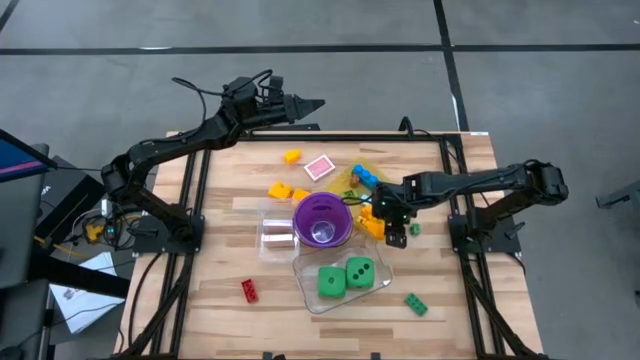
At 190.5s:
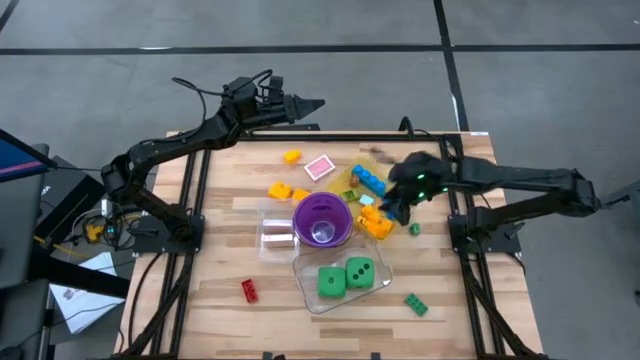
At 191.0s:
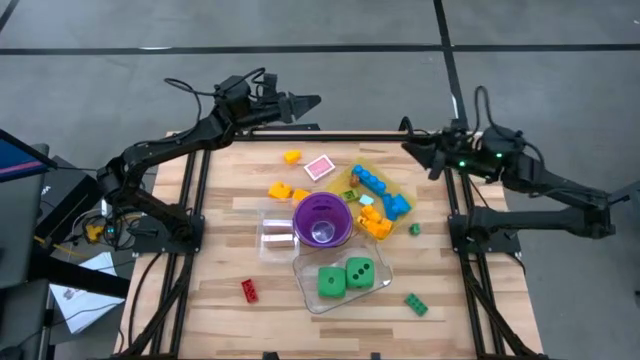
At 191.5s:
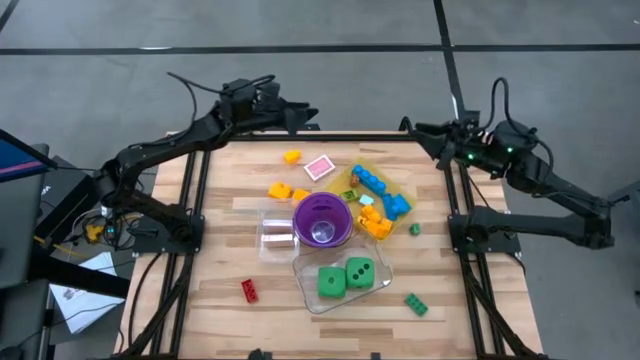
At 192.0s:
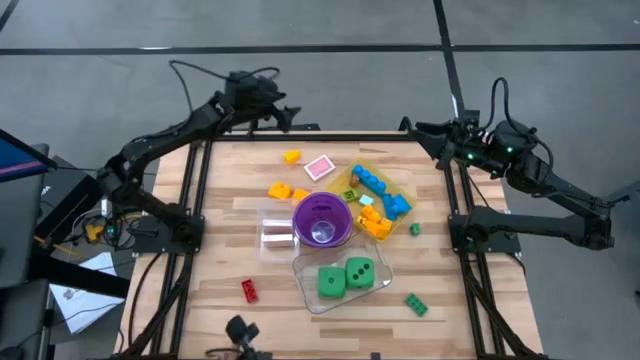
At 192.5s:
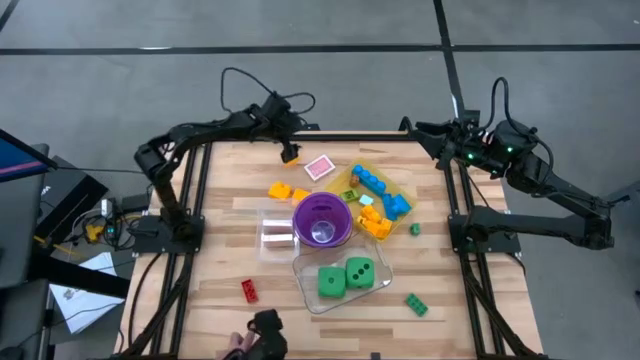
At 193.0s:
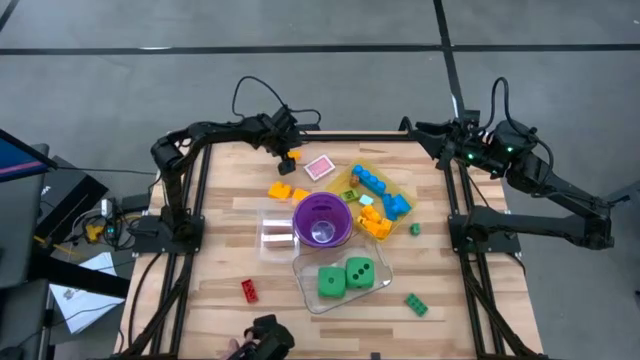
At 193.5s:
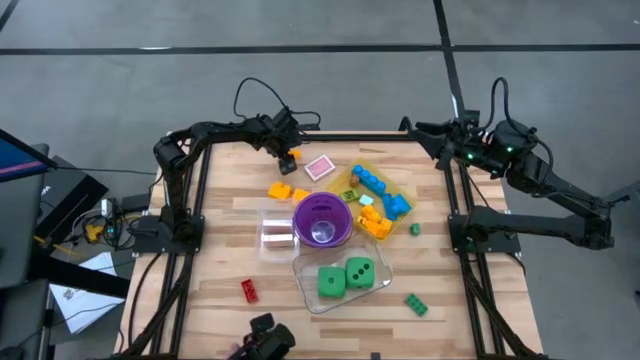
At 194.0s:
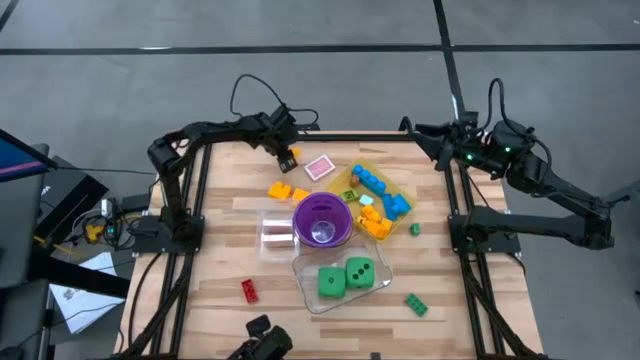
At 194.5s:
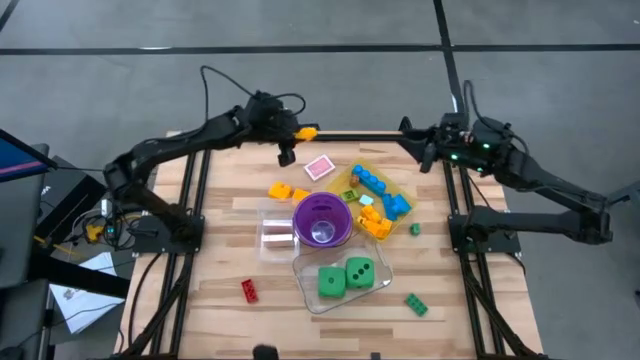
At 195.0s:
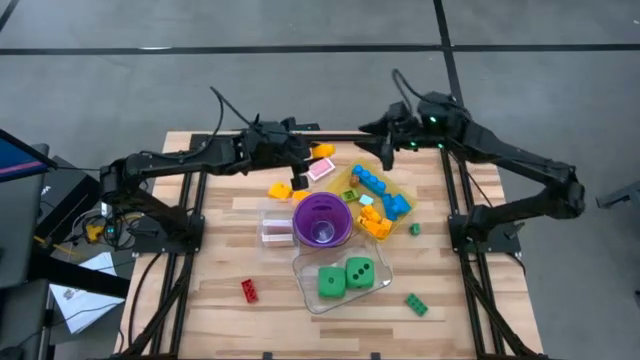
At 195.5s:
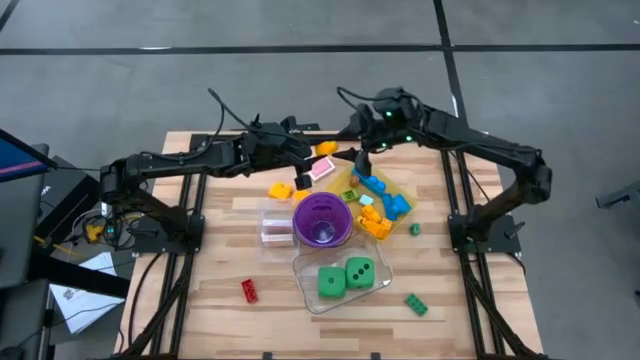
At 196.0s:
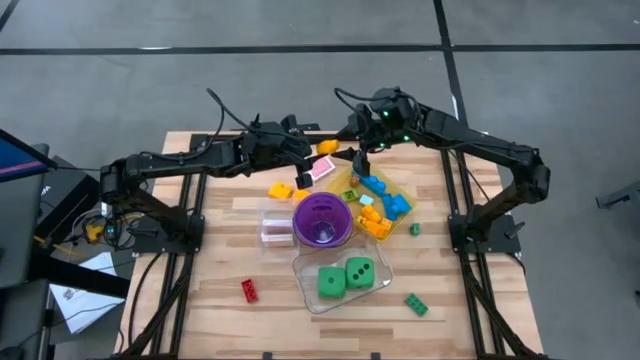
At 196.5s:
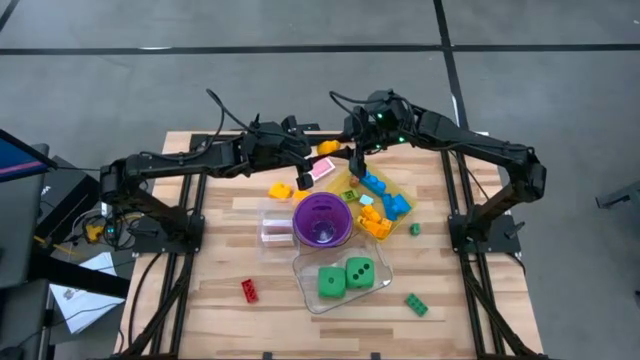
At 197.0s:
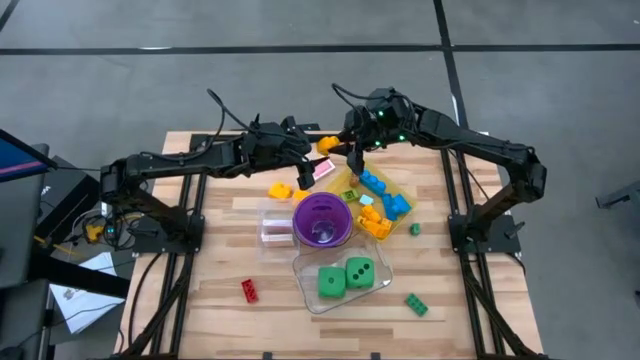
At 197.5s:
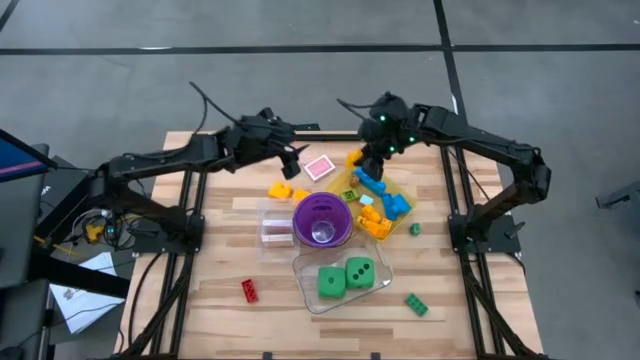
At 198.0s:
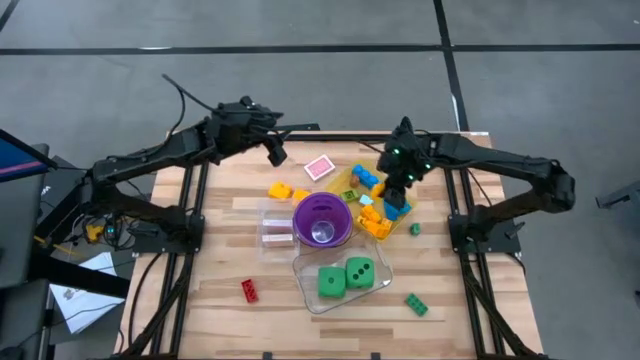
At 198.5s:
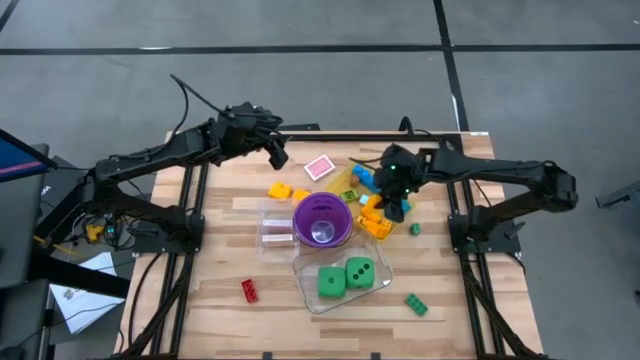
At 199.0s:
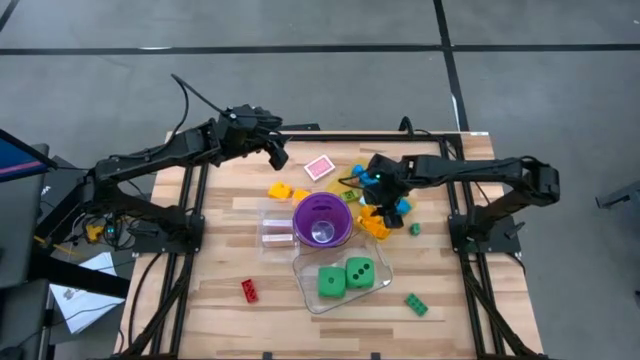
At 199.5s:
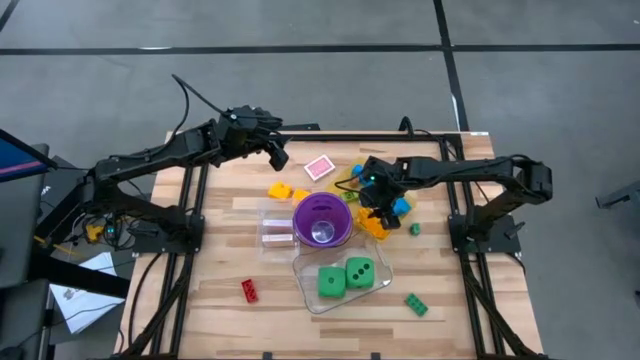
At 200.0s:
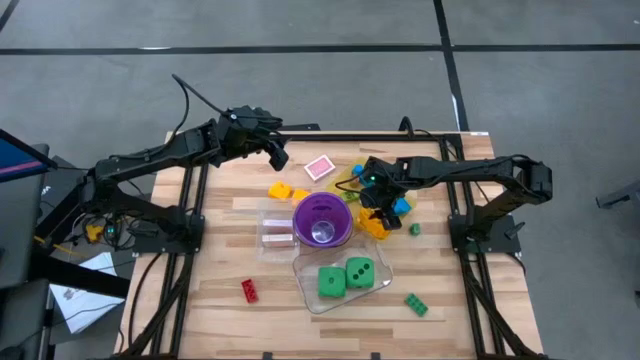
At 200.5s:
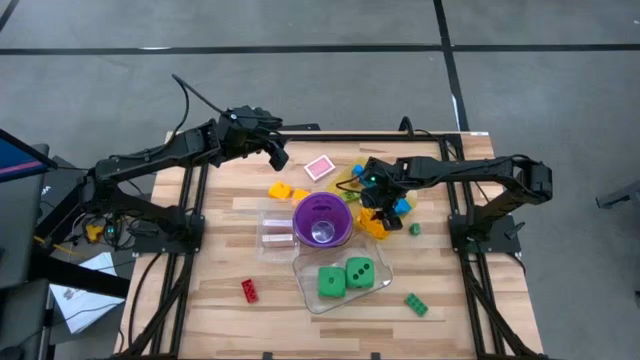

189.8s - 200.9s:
Task: Pick & Place Toys
Put the large yellow game piece into the yellow bin

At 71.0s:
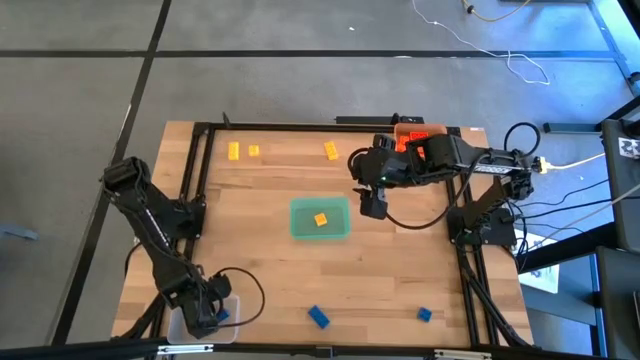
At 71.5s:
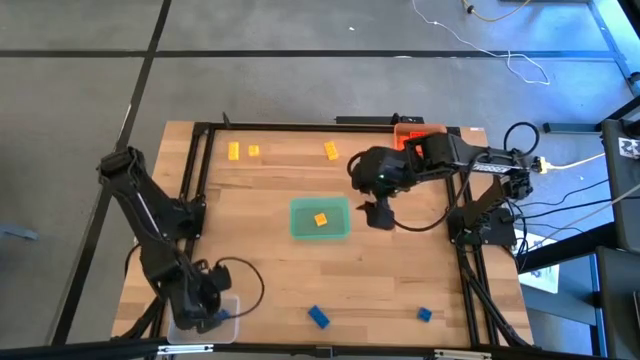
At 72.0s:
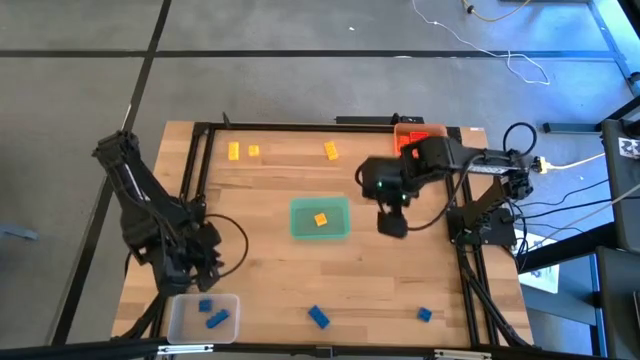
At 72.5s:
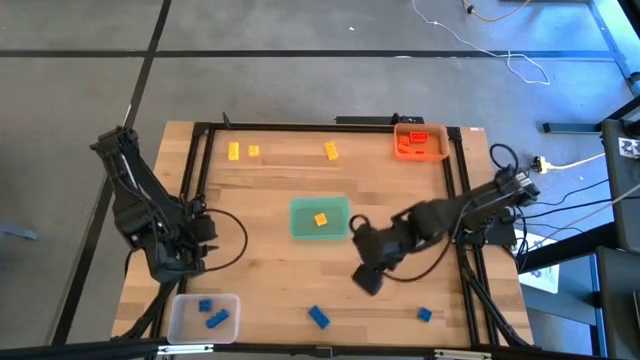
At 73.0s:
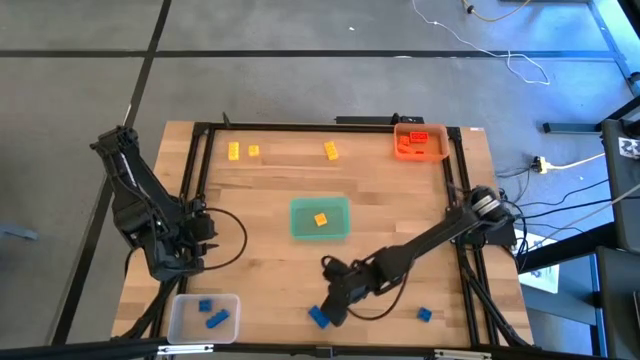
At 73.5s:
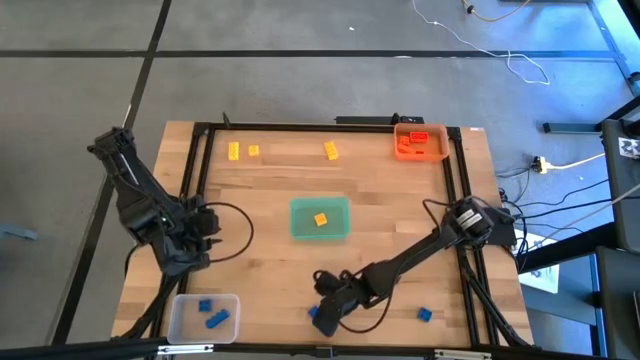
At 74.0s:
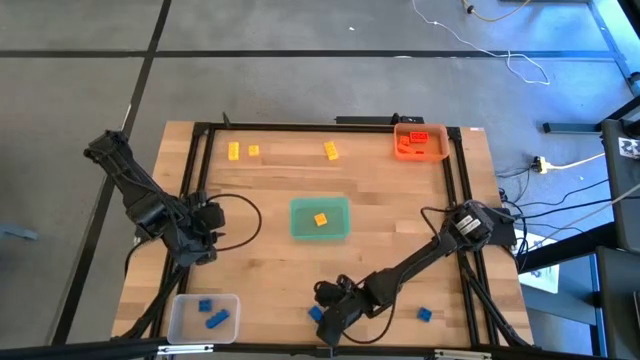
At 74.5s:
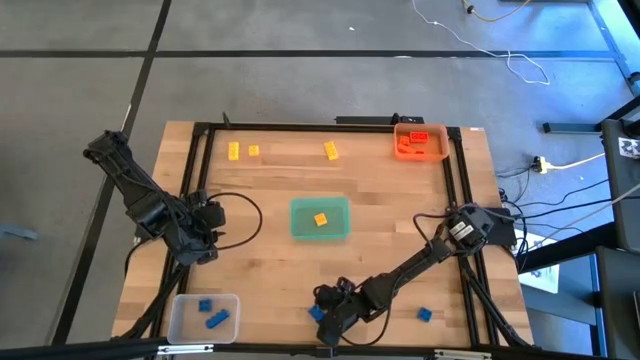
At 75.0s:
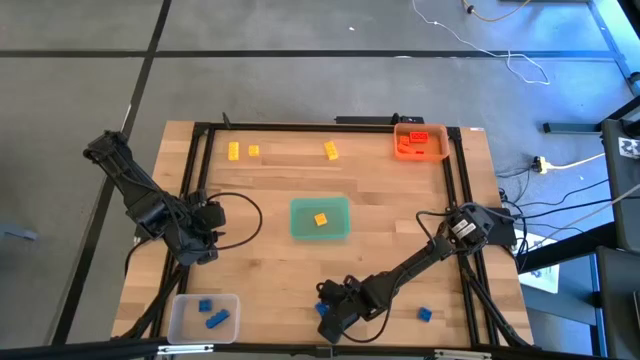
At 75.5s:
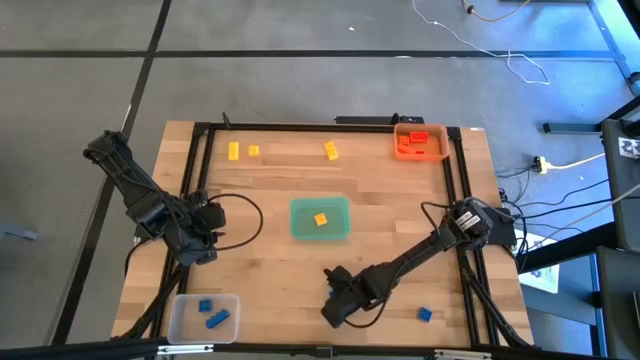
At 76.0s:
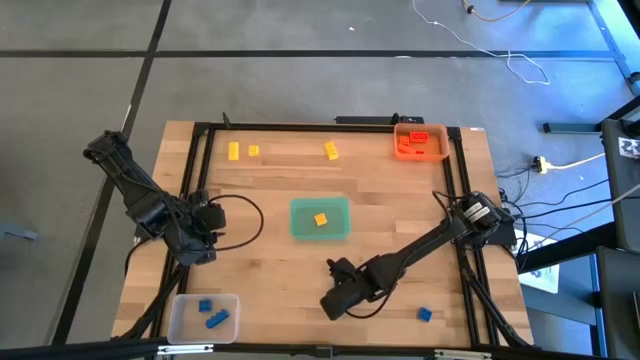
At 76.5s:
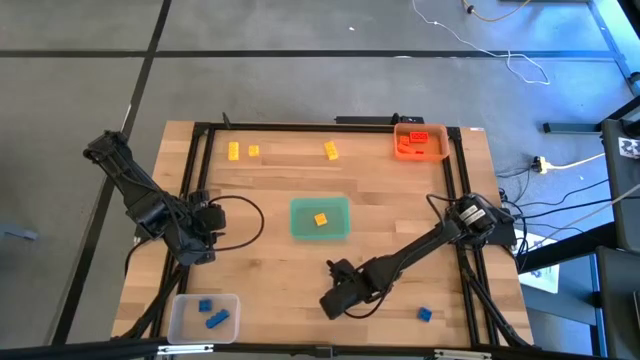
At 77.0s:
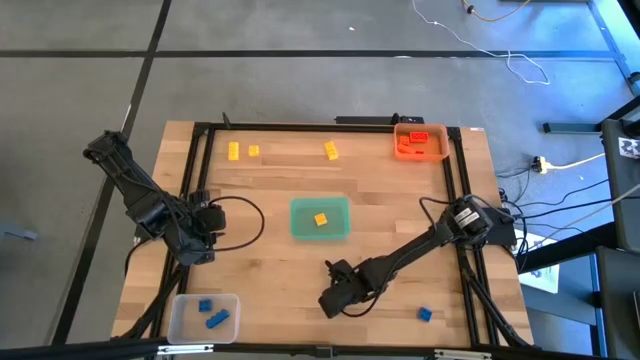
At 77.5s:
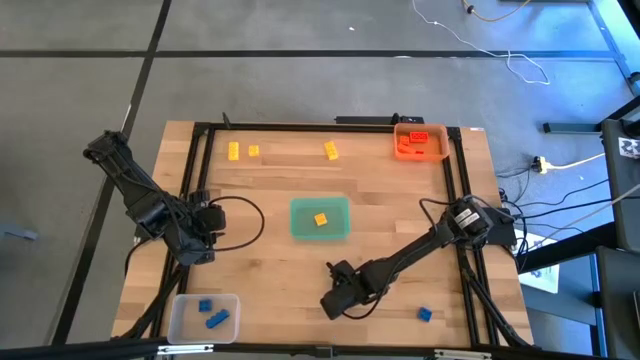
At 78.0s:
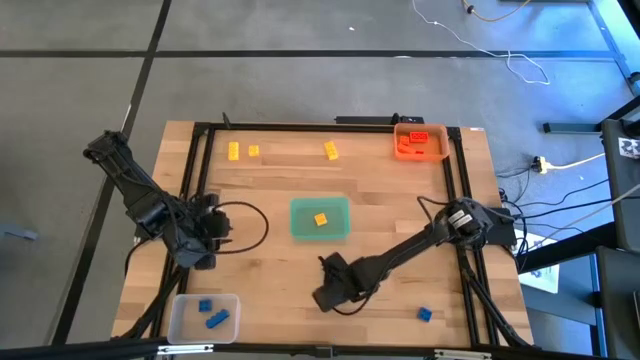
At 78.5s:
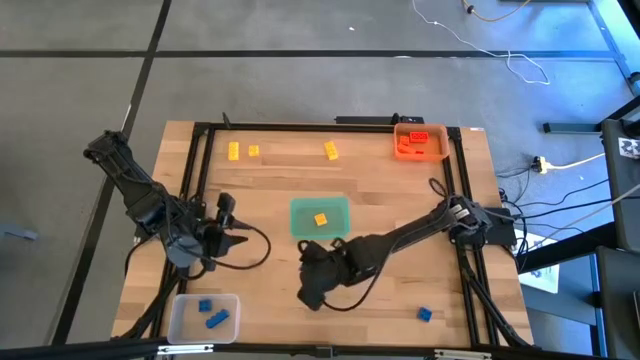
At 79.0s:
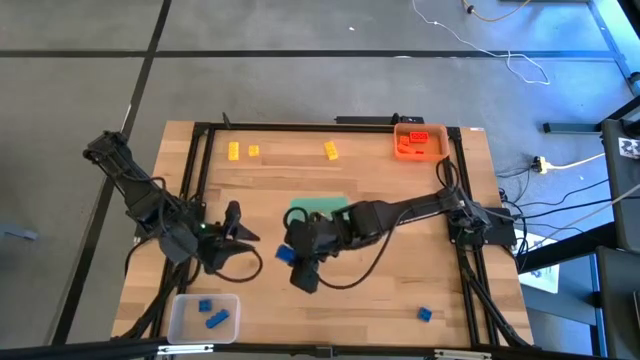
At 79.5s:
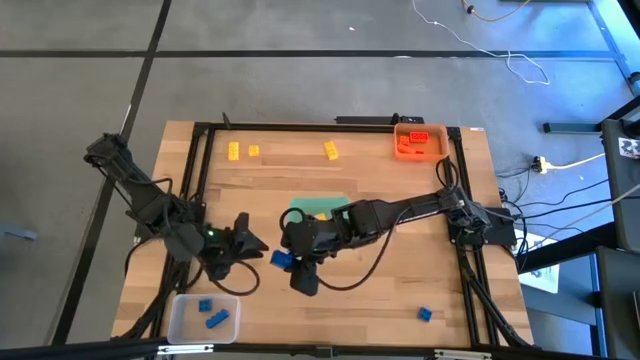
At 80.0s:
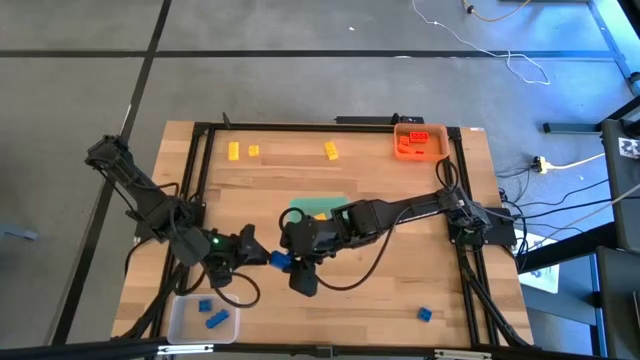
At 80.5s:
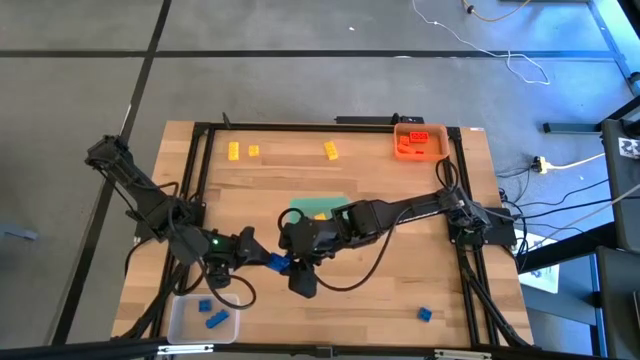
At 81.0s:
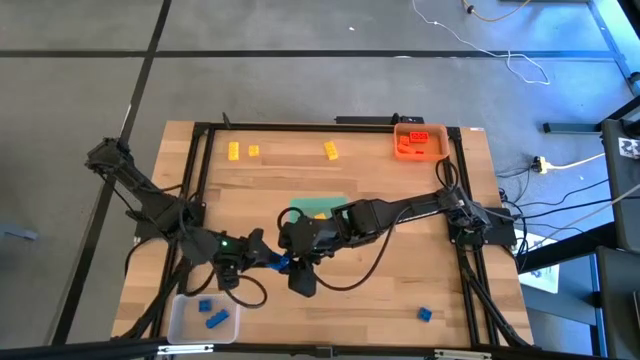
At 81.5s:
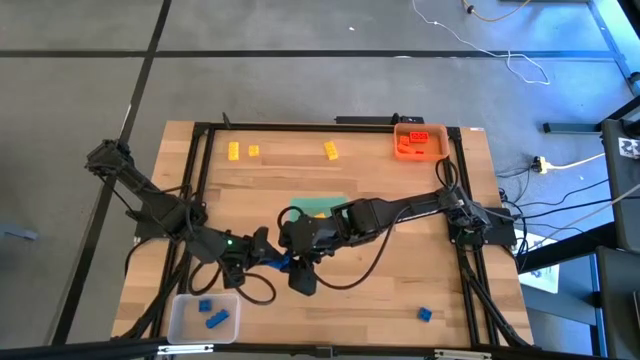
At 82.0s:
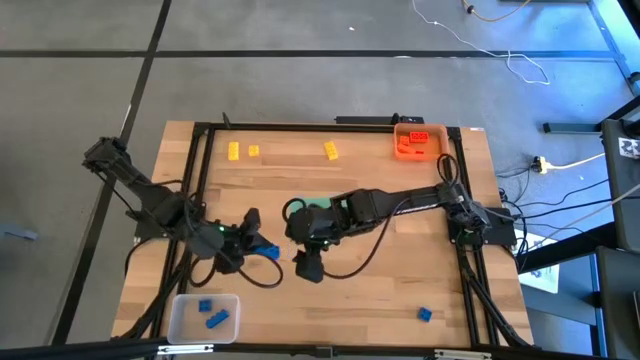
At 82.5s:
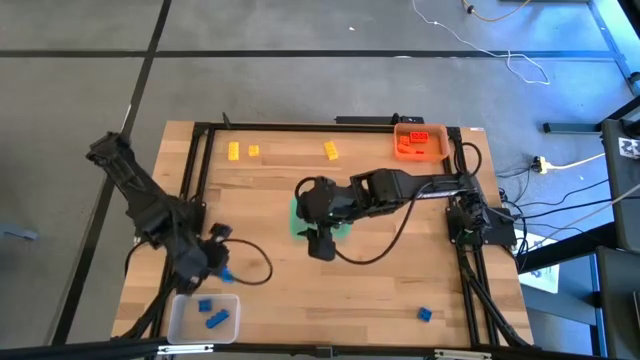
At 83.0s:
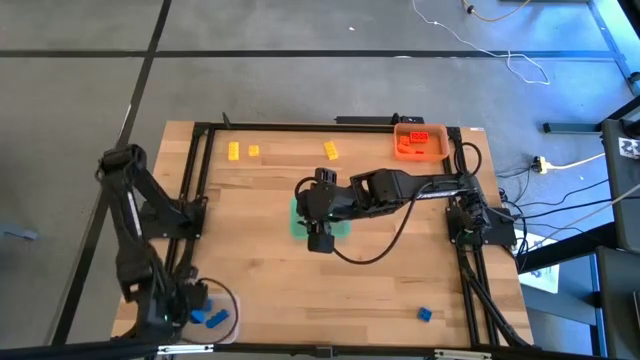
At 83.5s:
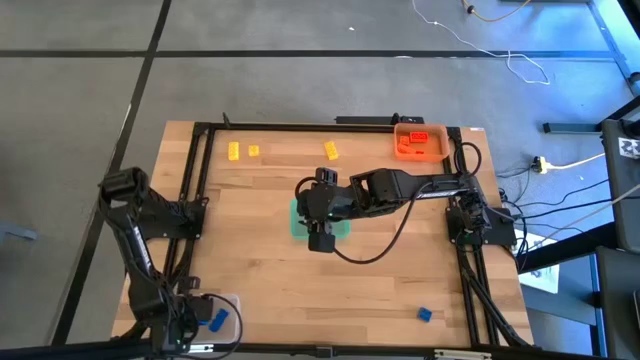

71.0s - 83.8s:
Task: Sort & place blocks by color
Put the blue game piece into the transparent bin
